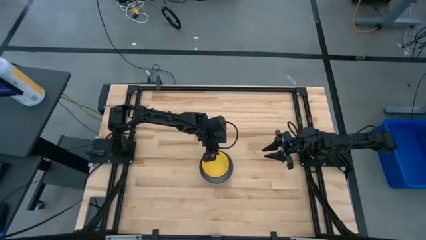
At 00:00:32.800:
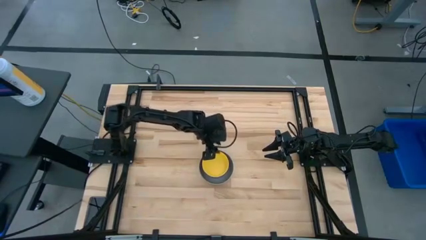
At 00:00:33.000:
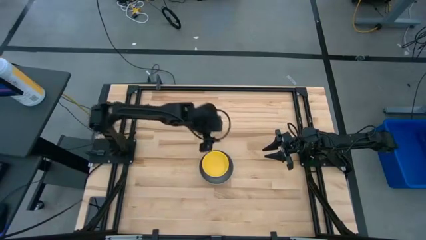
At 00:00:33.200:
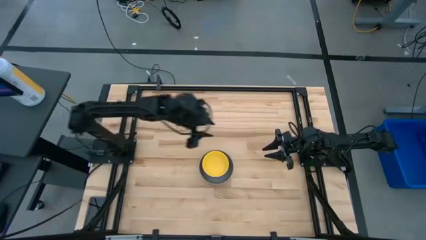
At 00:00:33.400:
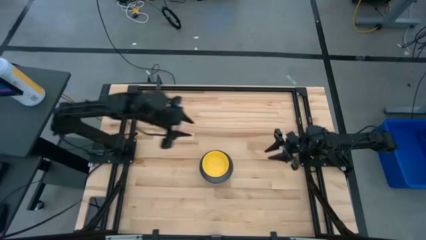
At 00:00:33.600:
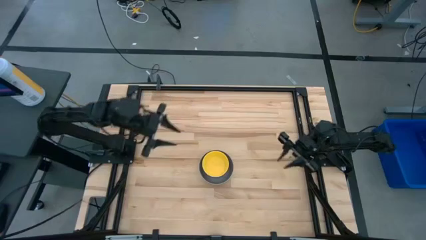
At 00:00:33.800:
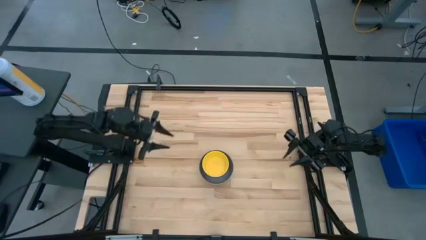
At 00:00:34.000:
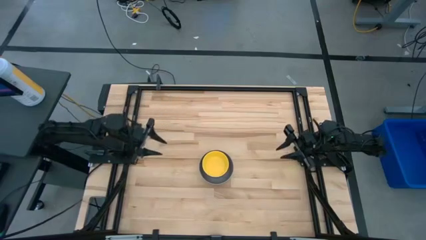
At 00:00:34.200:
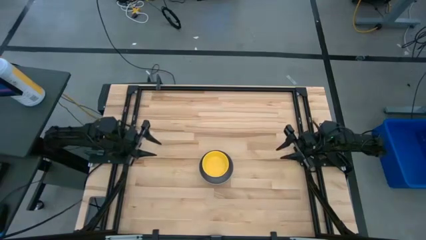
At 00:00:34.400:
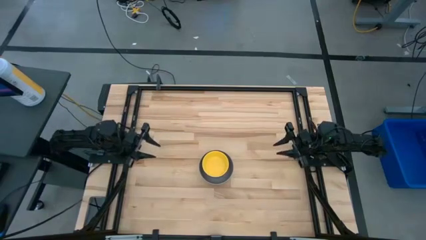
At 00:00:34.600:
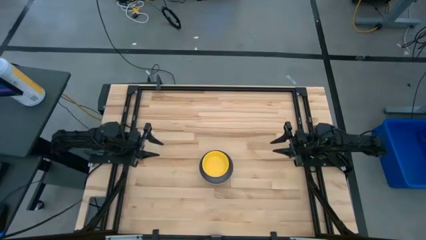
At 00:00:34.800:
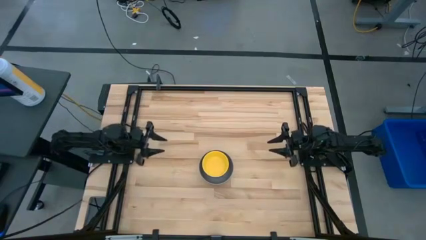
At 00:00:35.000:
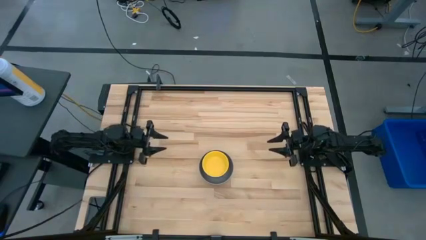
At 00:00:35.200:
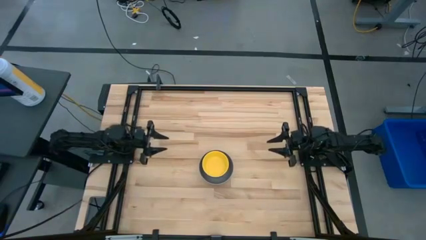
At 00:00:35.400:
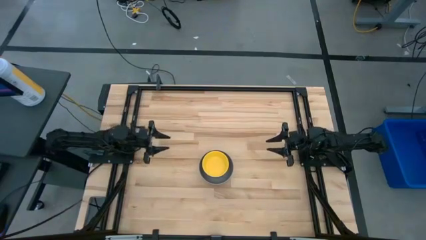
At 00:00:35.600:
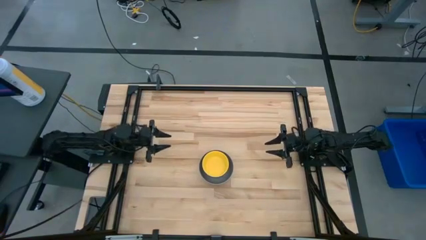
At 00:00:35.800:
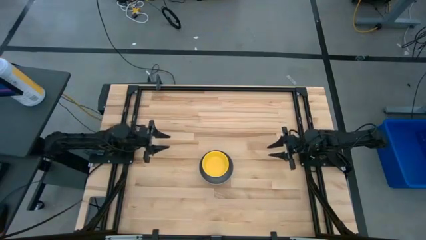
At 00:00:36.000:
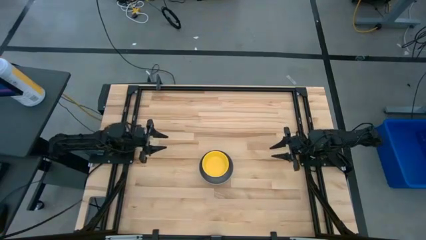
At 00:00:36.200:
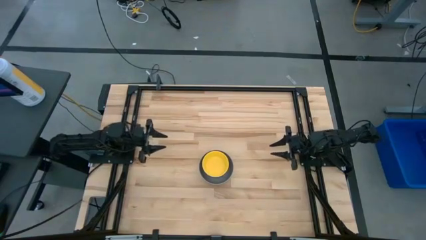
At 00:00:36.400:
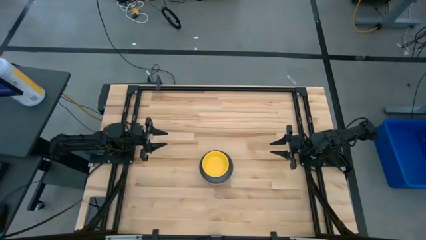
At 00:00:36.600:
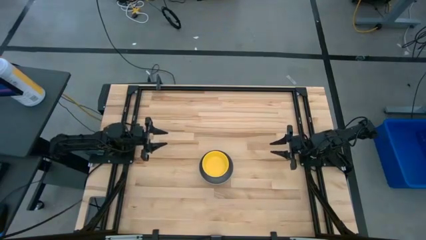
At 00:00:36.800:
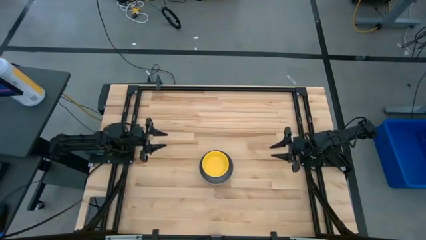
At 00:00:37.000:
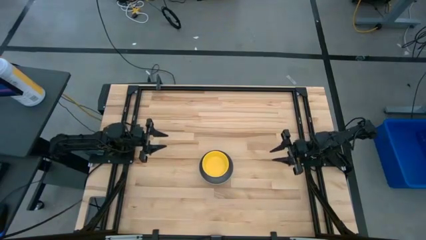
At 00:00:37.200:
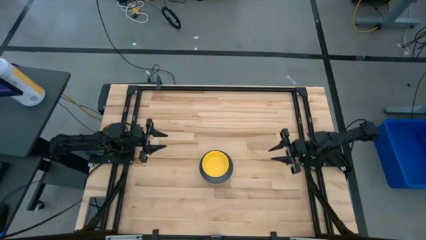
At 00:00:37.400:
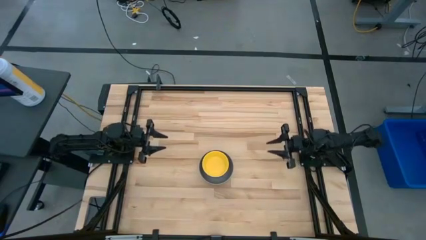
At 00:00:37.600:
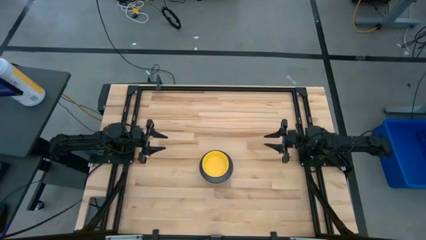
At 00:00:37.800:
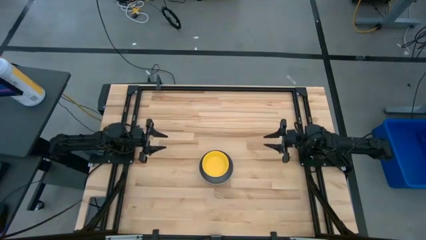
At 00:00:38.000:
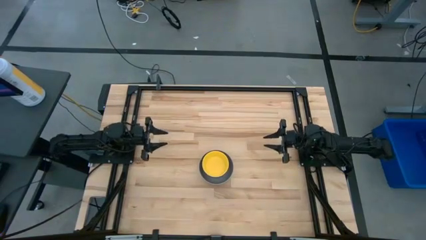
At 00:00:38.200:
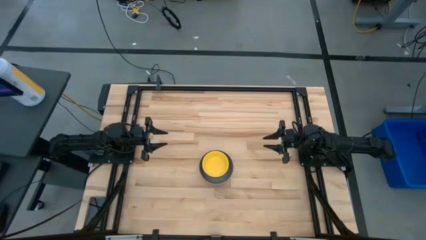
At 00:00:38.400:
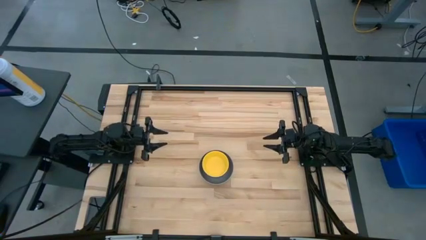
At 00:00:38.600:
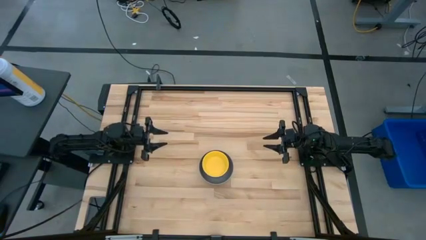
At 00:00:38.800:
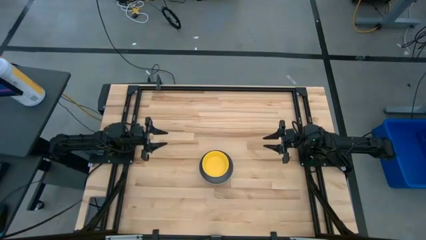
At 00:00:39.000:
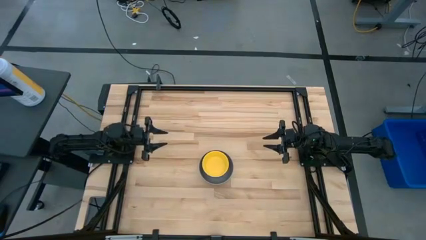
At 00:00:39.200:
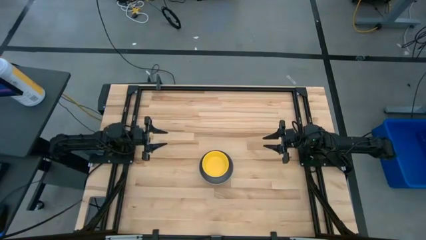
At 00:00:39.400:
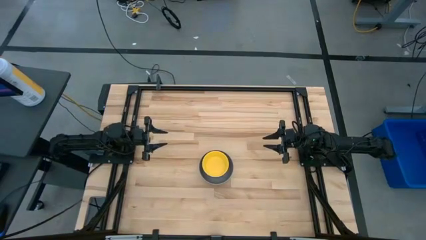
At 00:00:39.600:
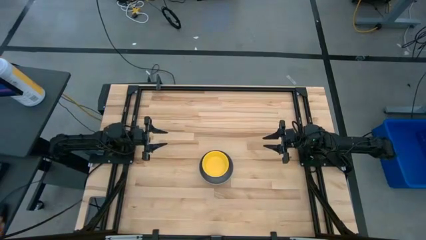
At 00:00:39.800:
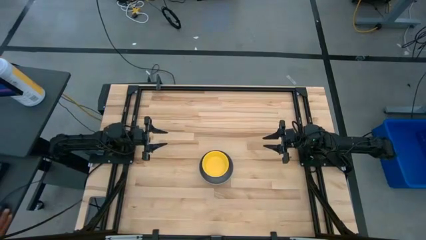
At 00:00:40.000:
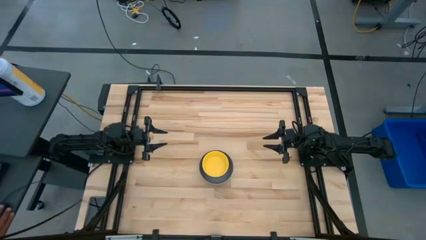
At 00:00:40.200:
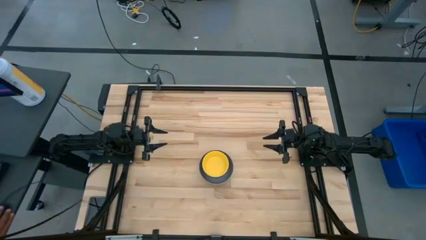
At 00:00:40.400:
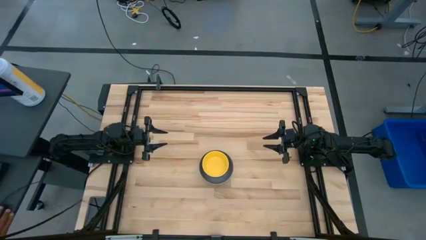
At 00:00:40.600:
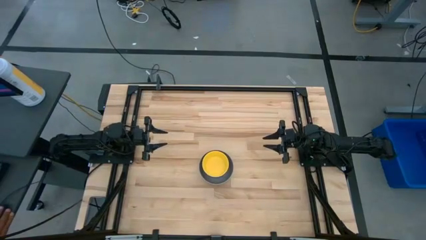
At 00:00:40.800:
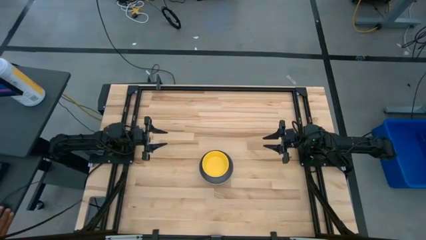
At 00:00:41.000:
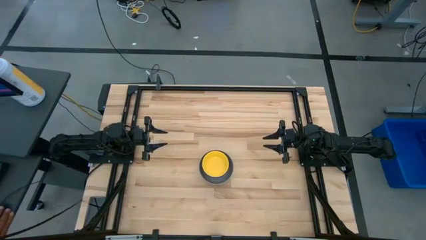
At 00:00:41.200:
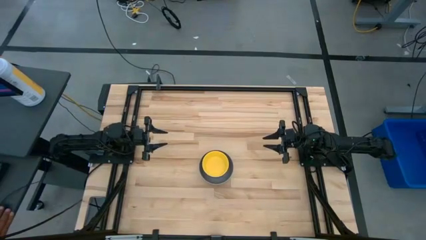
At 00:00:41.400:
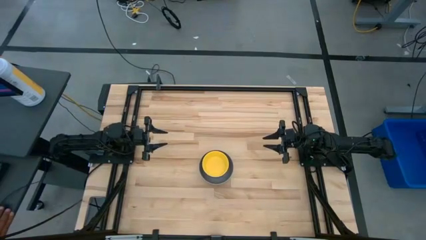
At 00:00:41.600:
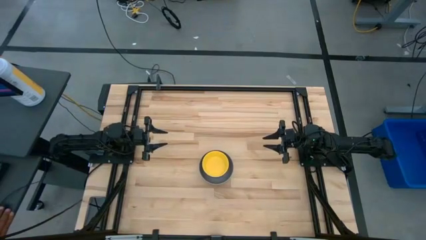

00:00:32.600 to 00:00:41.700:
Return to Home Position

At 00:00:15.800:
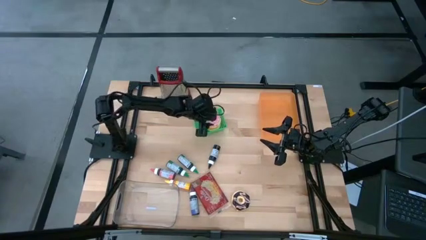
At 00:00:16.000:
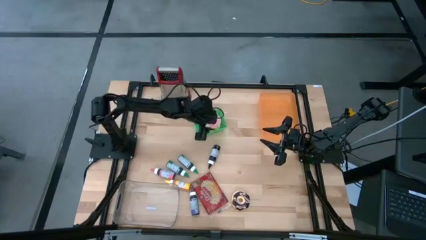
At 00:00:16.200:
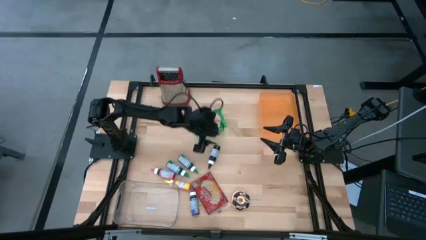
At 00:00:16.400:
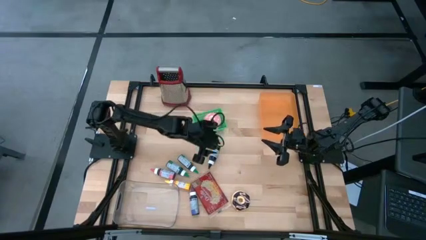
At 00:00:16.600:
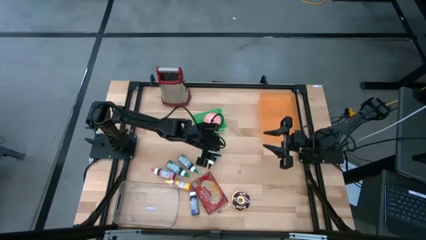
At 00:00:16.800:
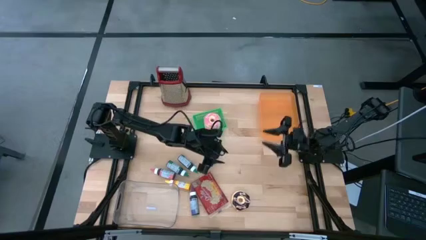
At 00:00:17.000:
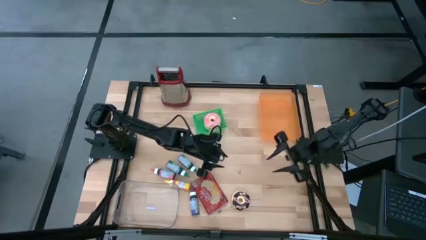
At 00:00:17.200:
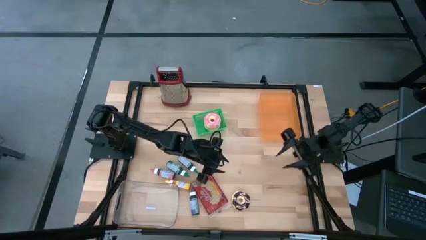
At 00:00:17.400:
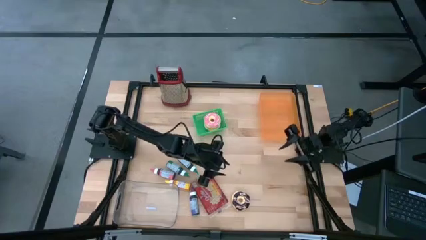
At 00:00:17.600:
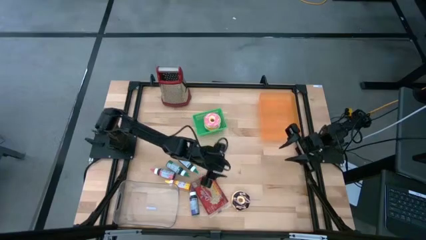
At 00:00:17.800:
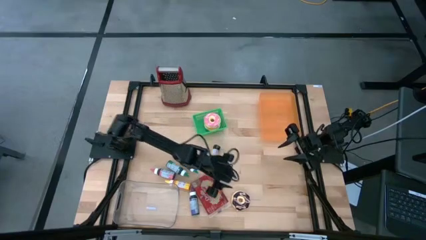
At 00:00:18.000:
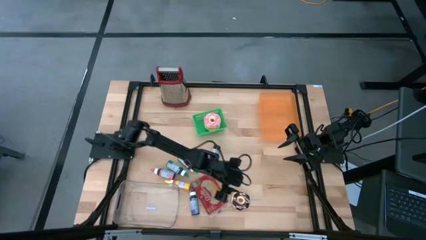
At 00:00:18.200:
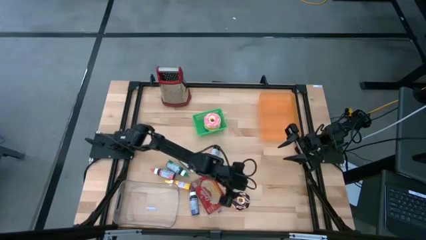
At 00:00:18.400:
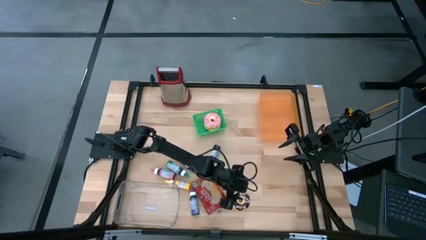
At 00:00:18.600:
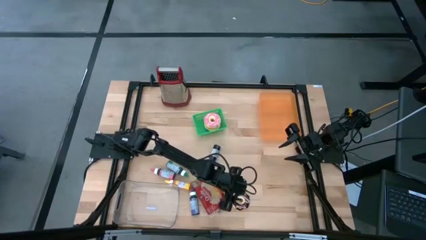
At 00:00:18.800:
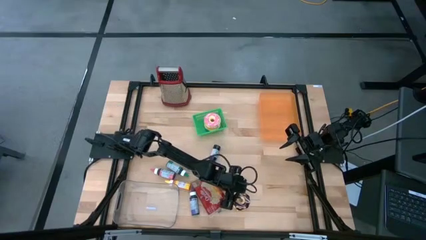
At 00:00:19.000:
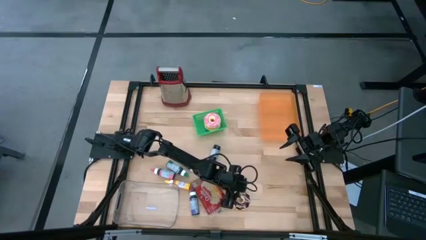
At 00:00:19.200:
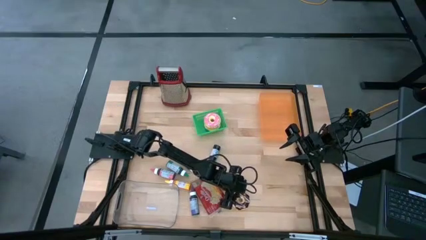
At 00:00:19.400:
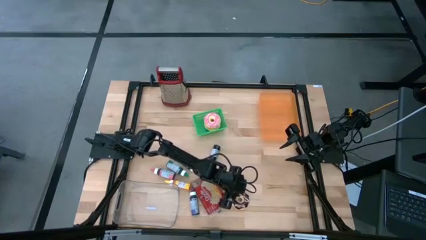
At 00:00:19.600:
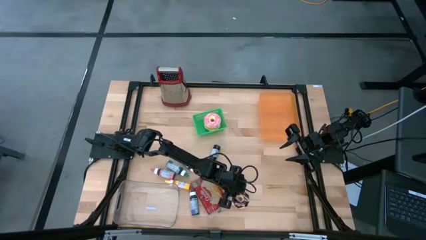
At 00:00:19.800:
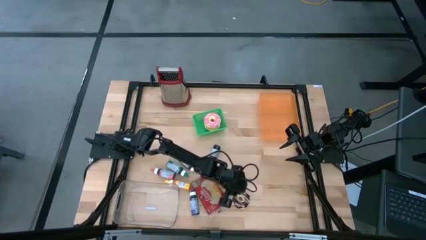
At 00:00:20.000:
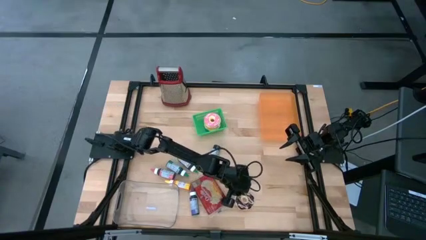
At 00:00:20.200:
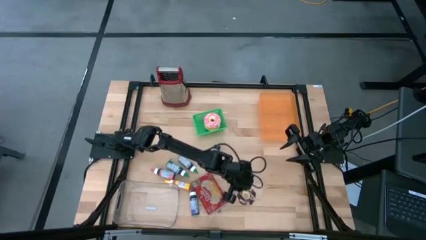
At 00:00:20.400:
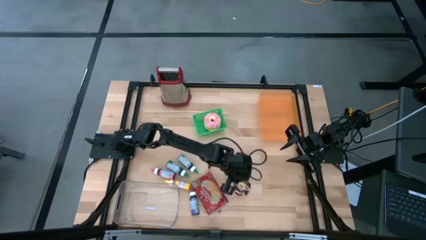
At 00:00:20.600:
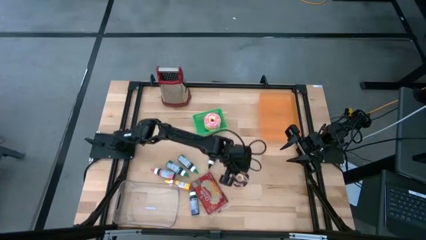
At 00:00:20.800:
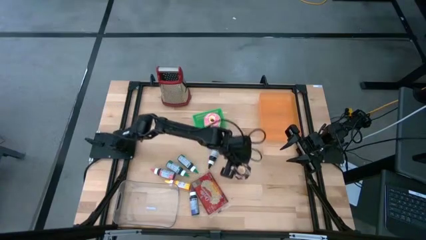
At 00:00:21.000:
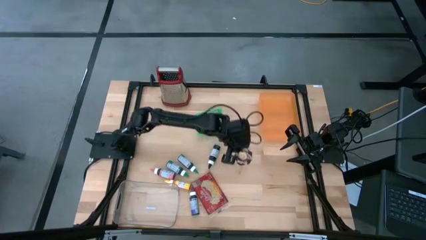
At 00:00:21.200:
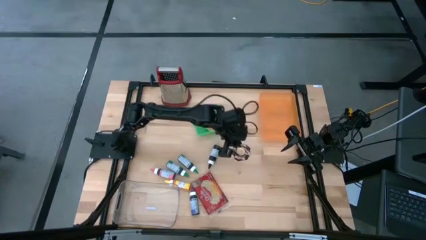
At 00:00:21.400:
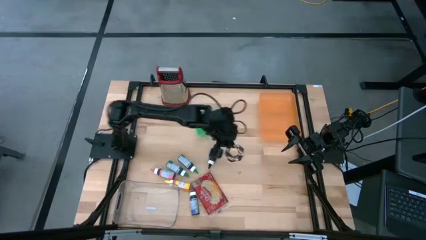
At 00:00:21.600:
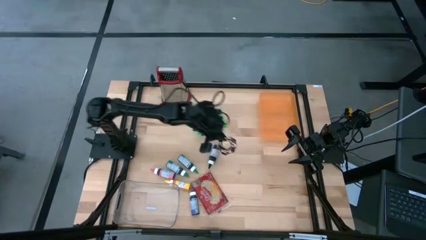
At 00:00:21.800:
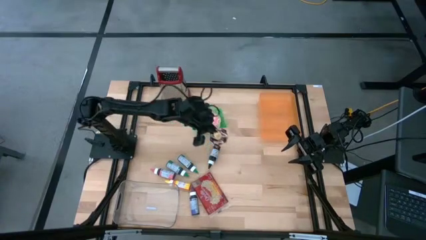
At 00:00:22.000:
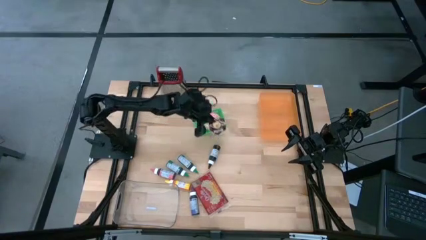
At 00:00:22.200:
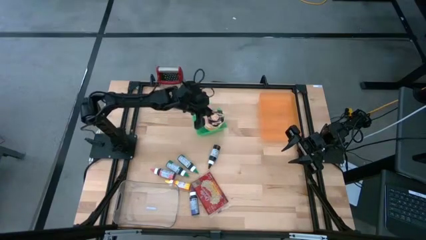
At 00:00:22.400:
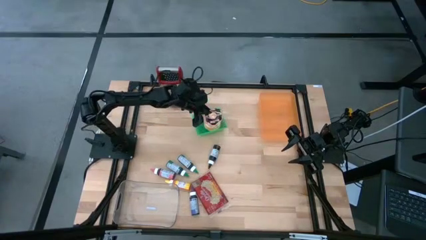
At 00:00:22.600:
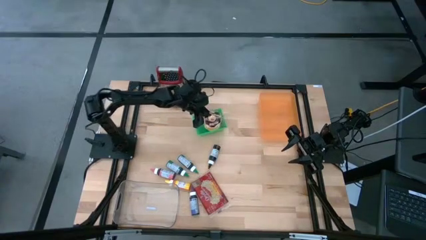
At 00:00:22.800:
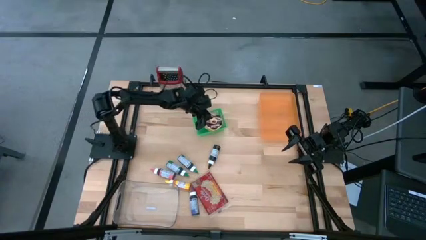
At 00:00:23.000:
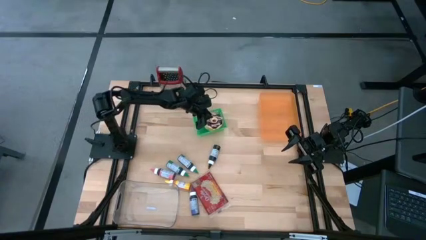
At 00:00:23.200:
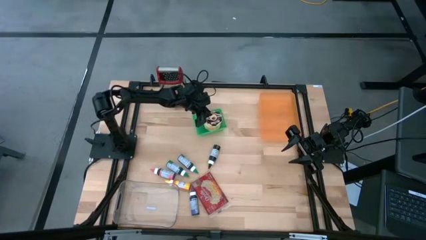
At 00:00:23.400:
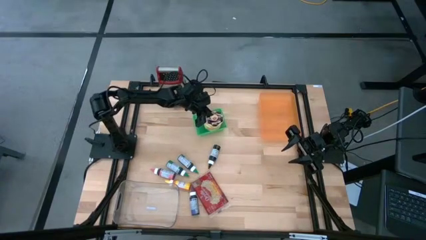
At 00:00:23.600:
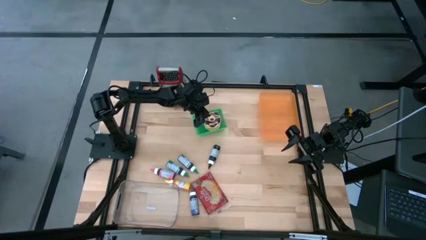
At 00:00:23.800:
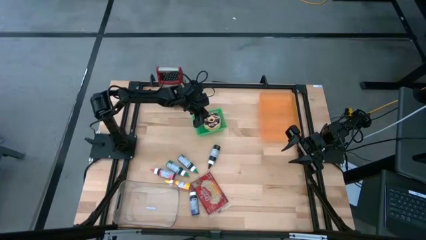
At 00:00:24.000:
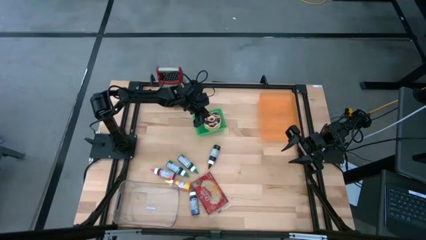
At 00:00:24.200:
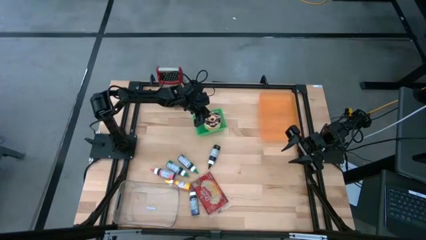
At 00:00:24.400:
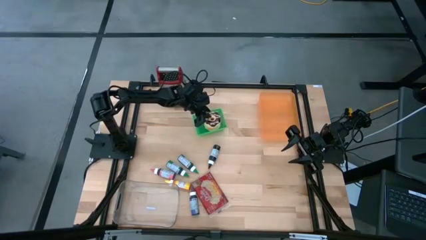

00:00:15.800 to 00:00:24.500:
Put the black donut into the green bin
